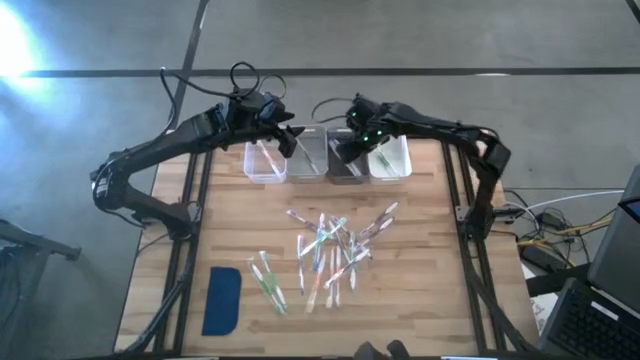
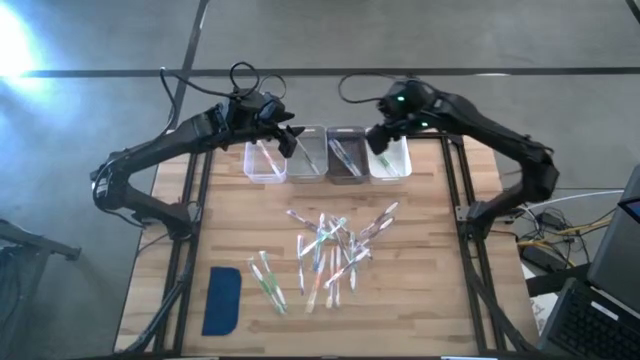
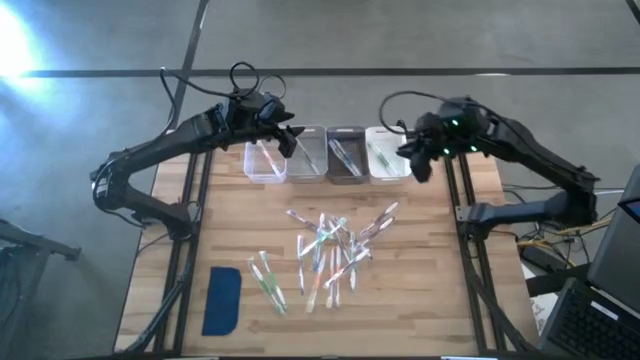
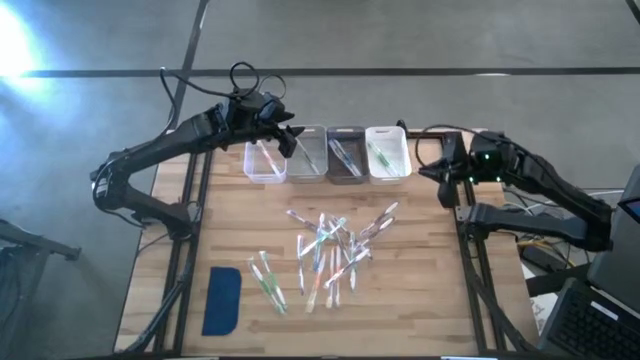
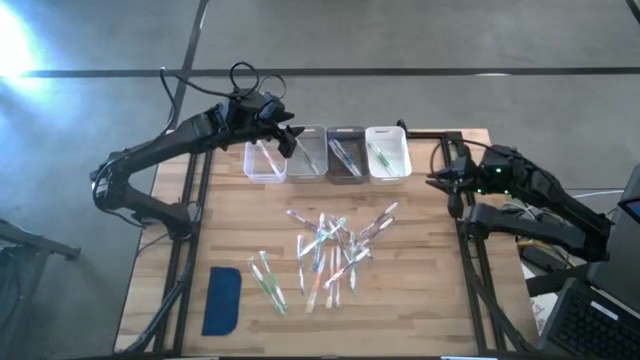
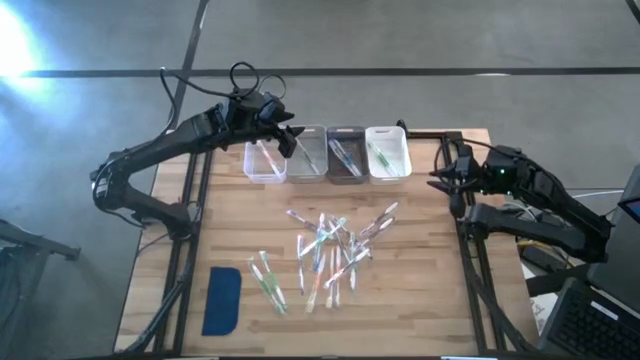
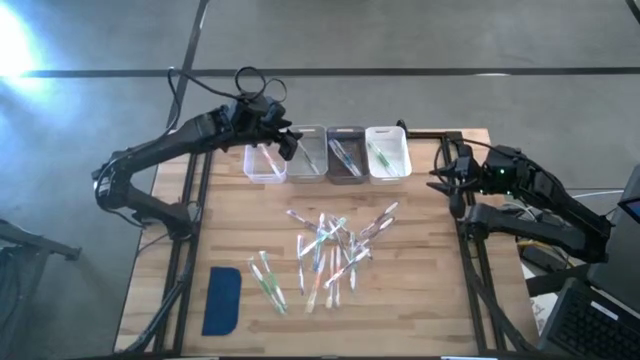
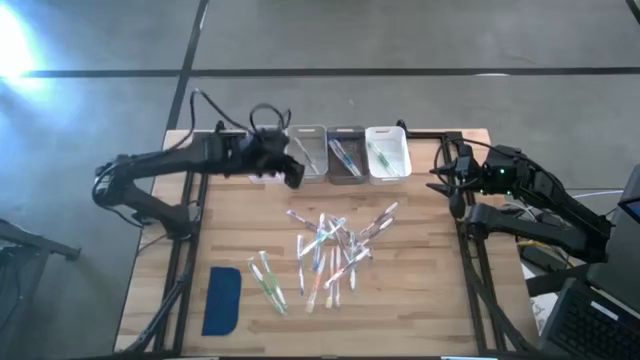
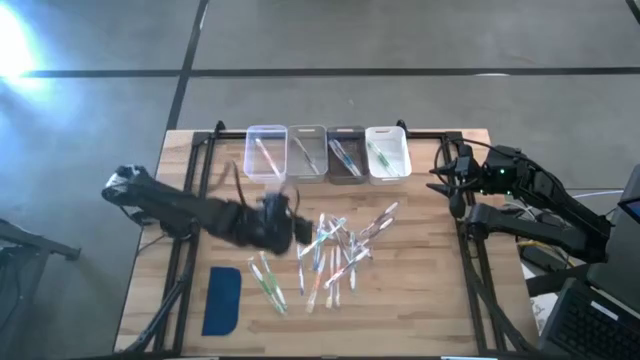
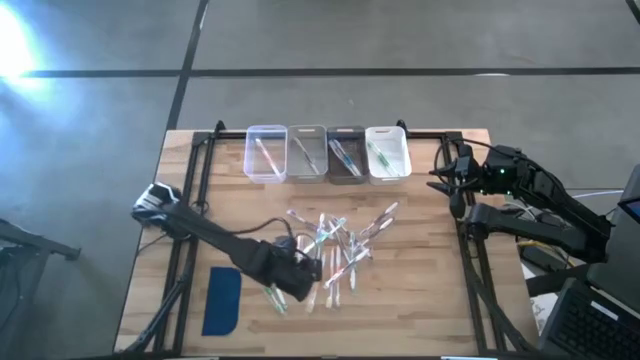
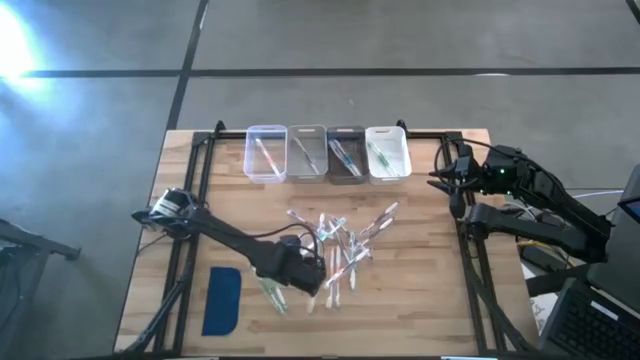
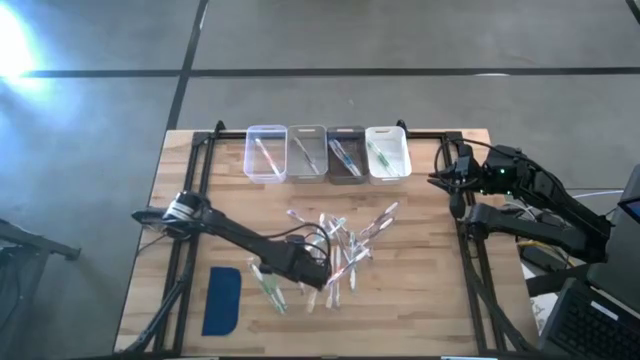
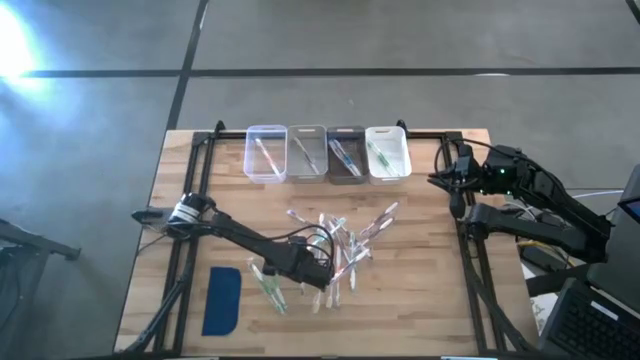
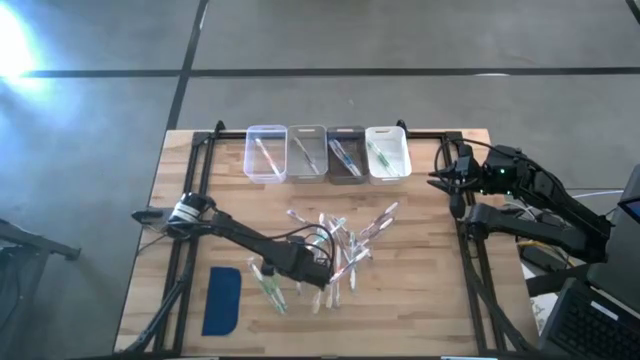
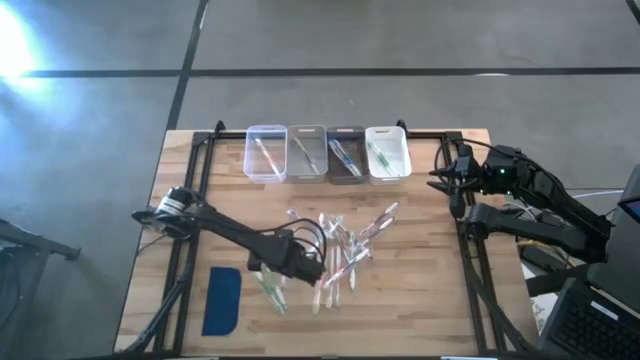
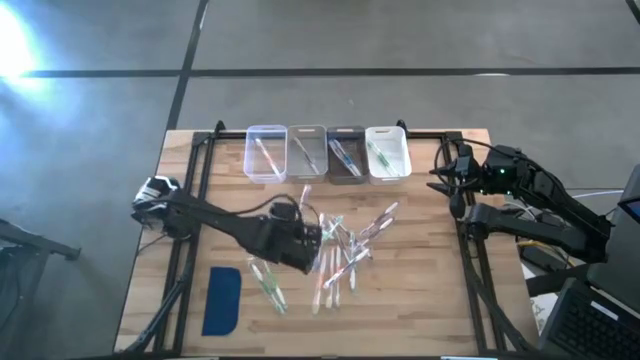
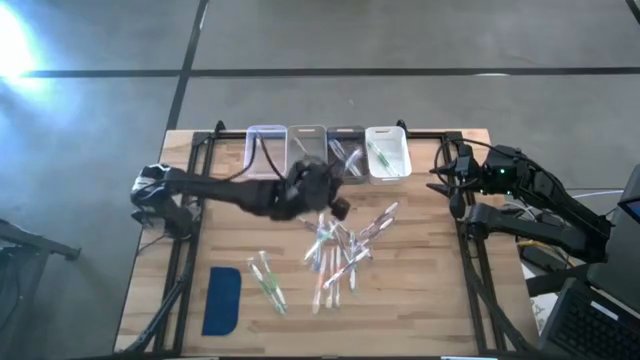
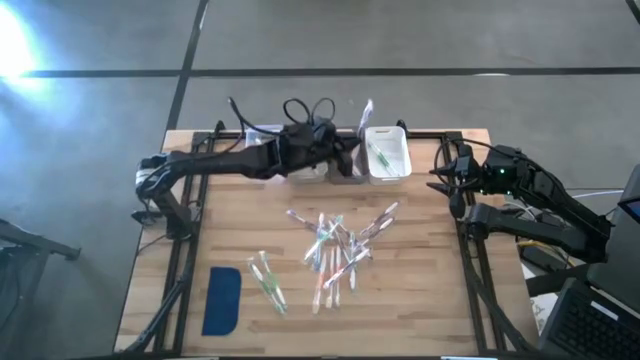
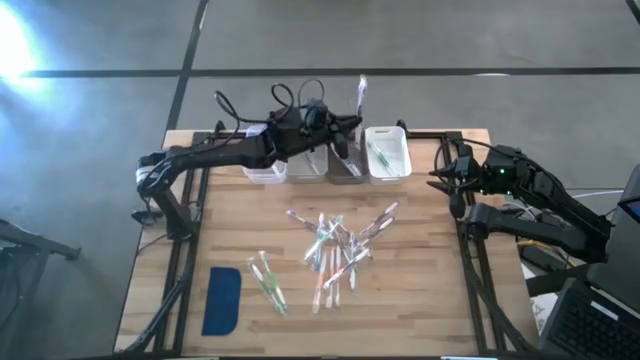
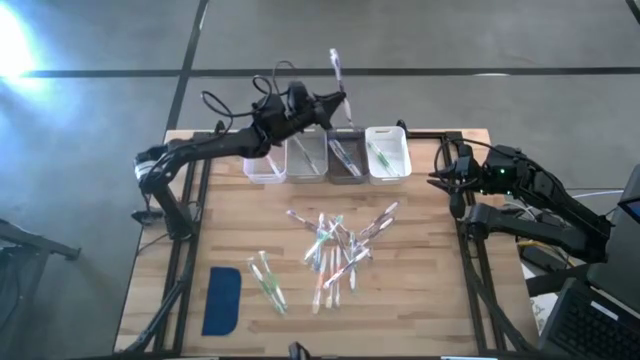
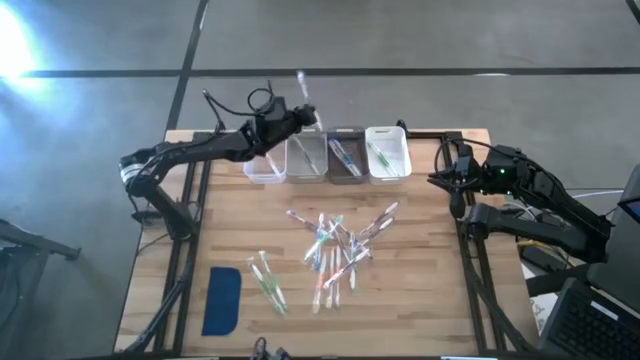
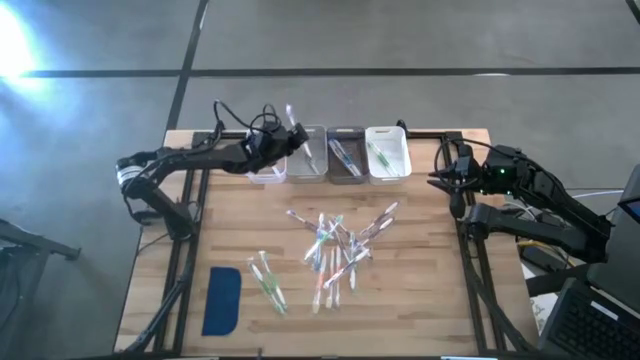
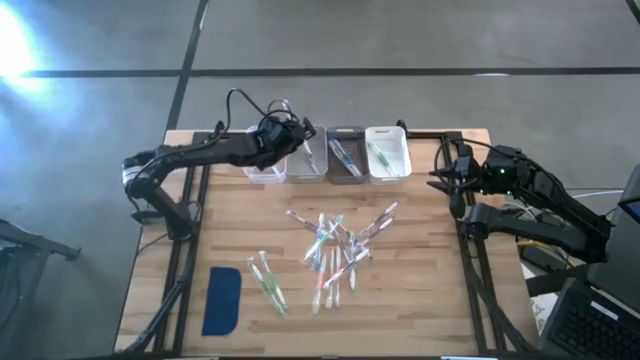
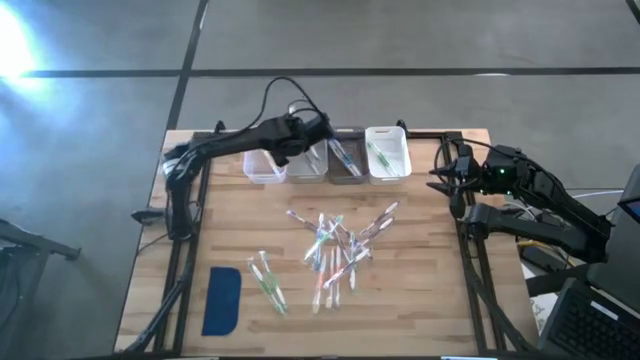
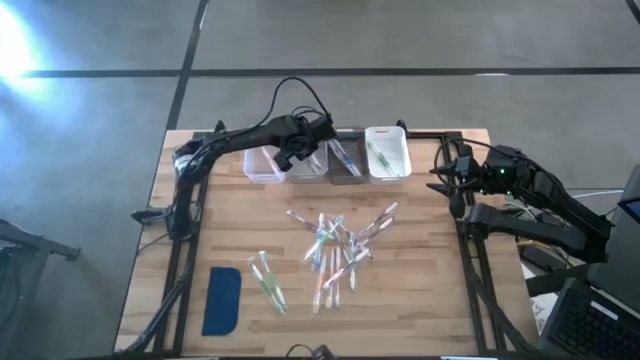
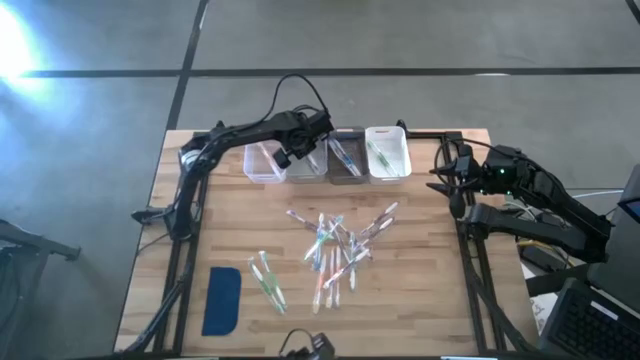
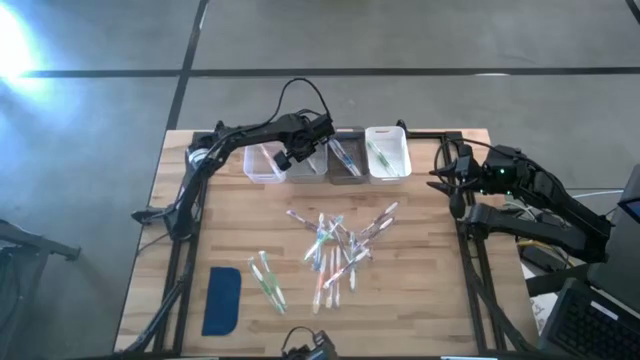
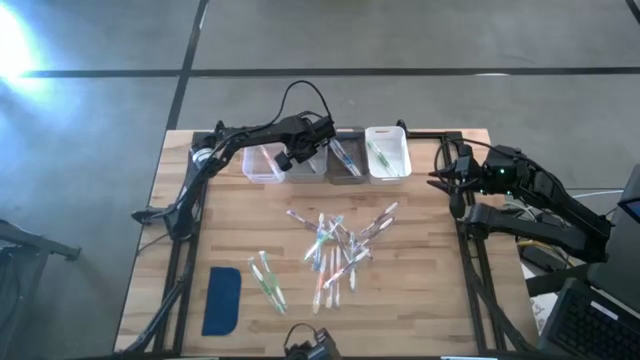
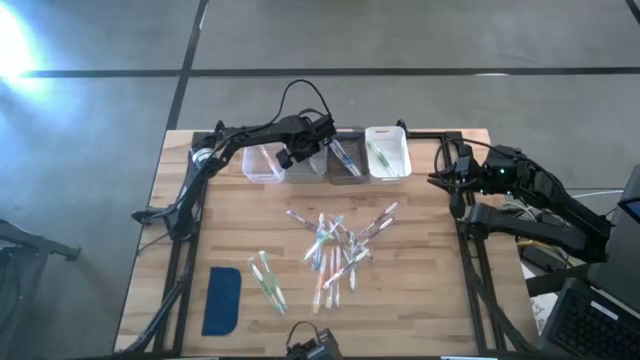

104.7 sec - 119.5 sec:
Task: Pick & Place Toothbrushes
Put the purple toothbrush into the gray bin

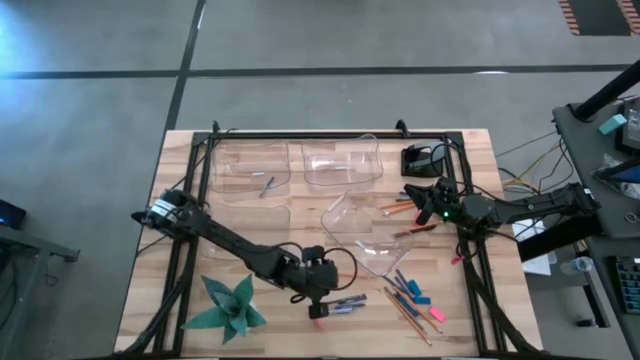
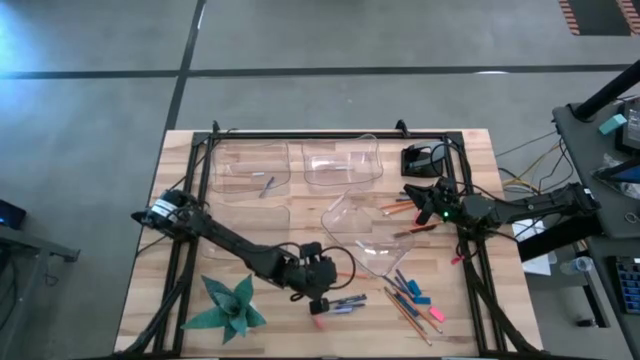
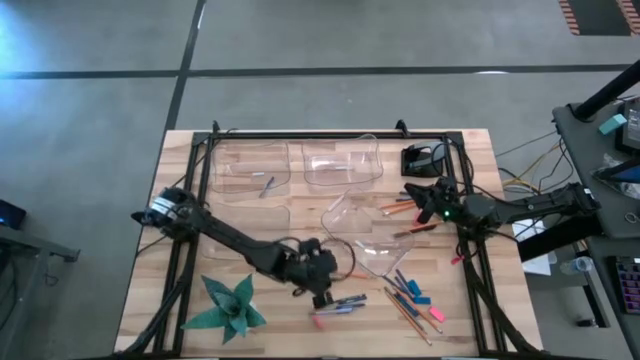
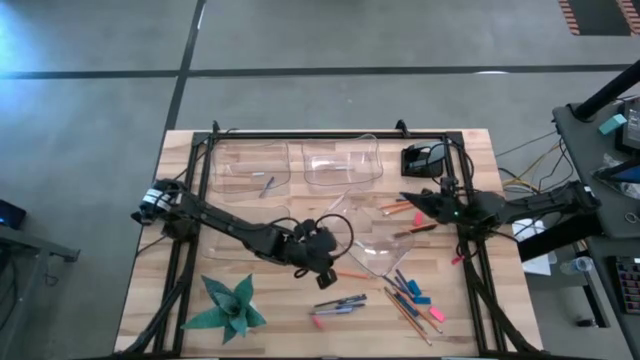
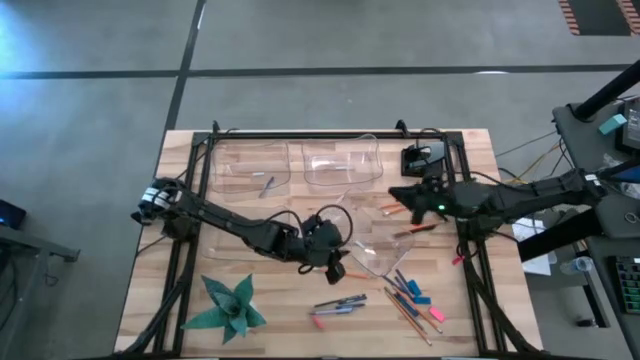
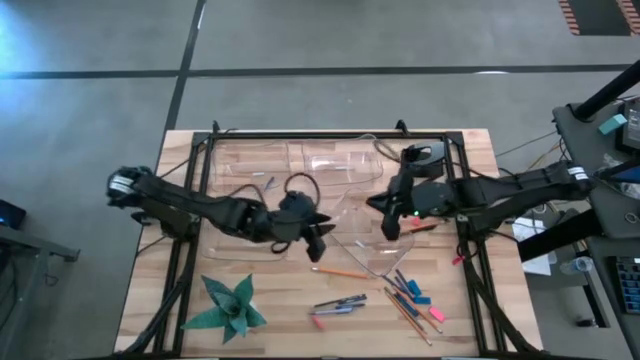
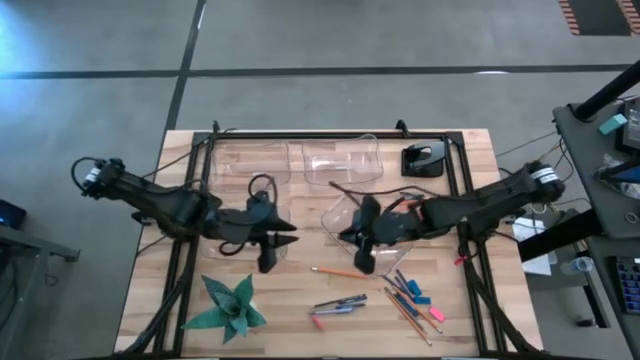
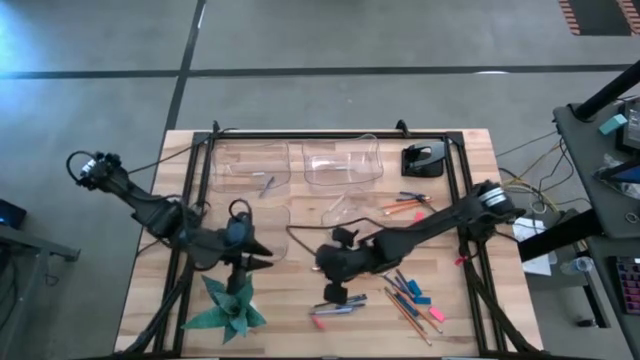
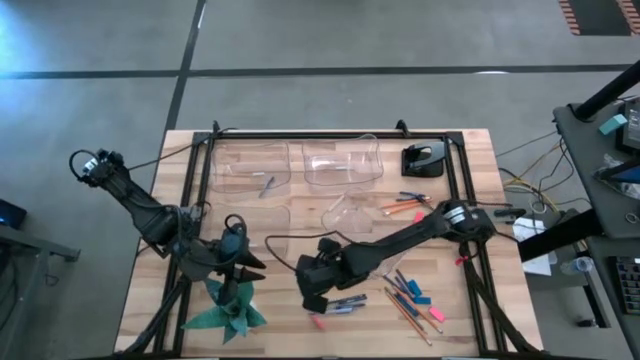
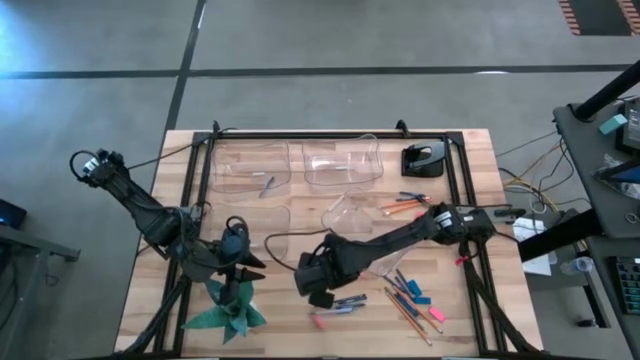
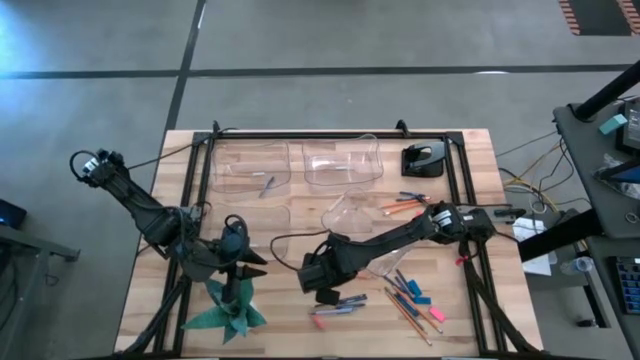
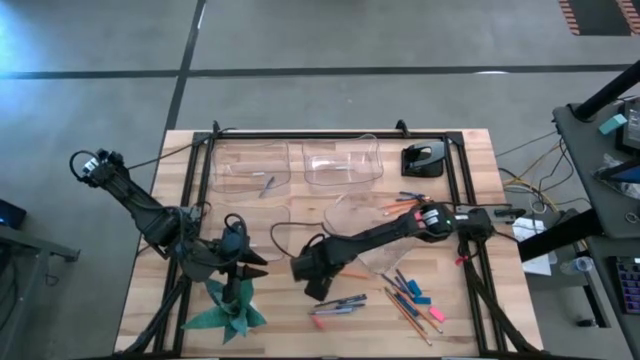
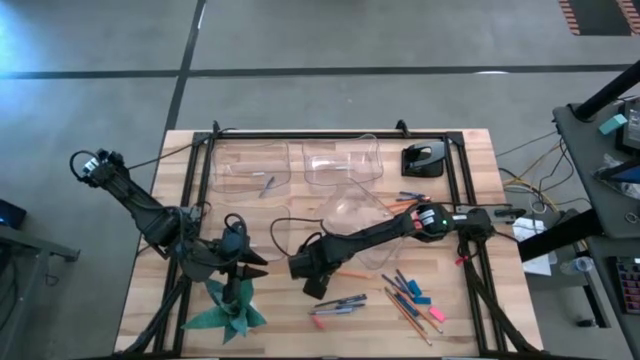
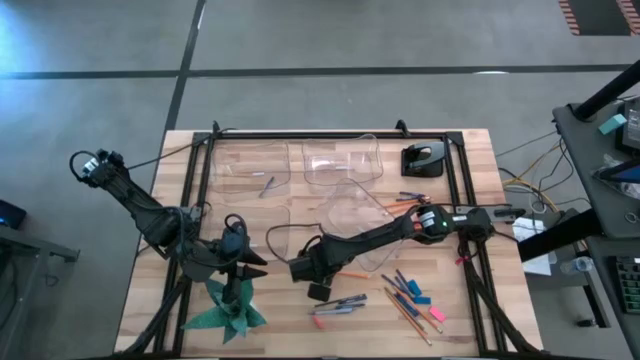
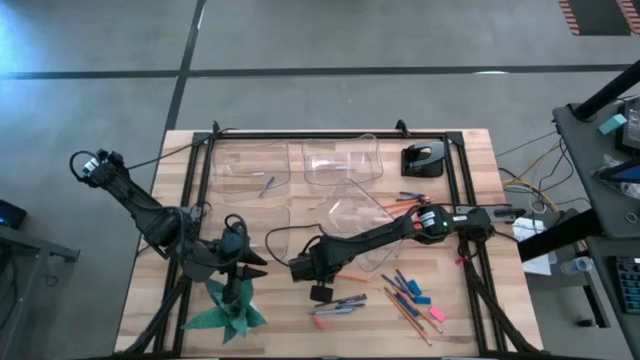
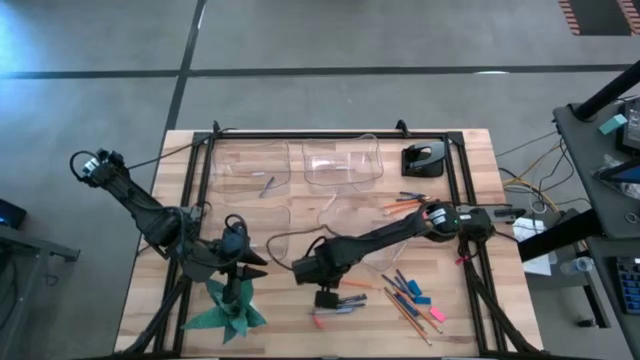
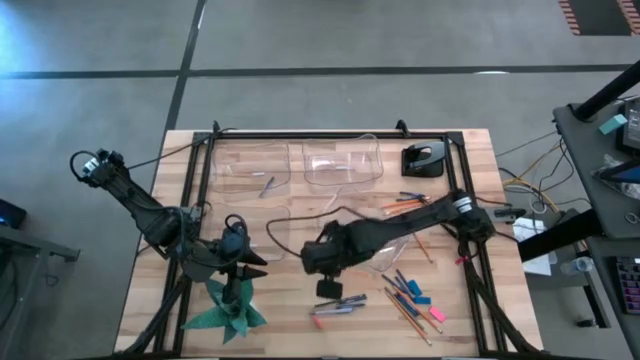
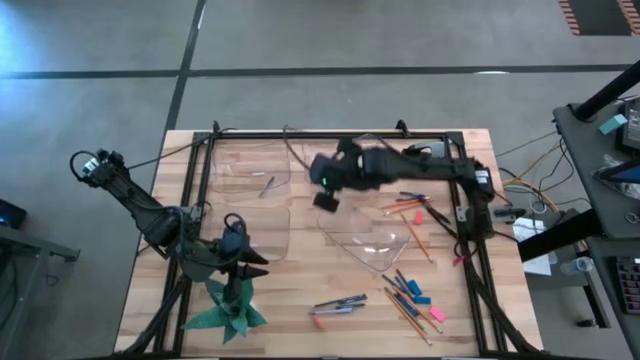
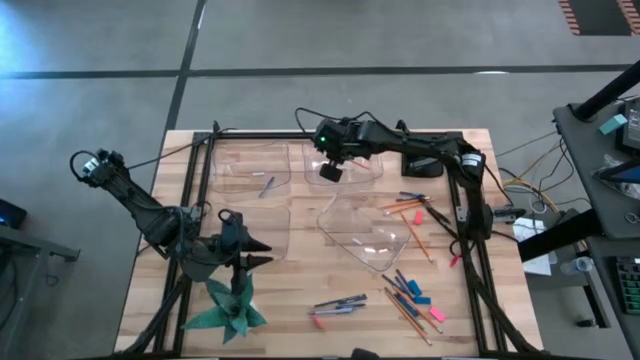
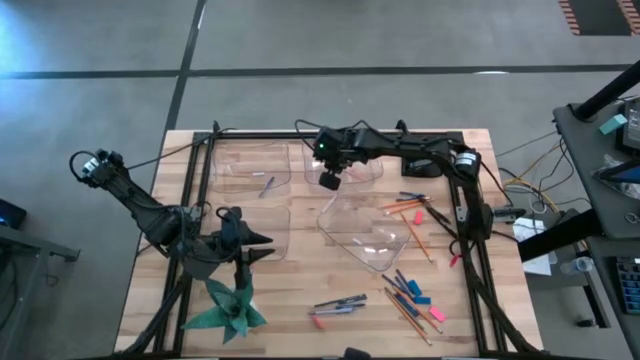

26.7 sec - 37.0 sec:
Task: Sort crayons/erasers/pens/pencils in bins
Put the orange pencil into the top right transparent bin
